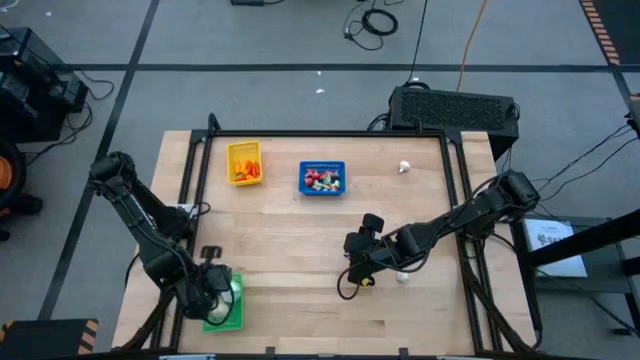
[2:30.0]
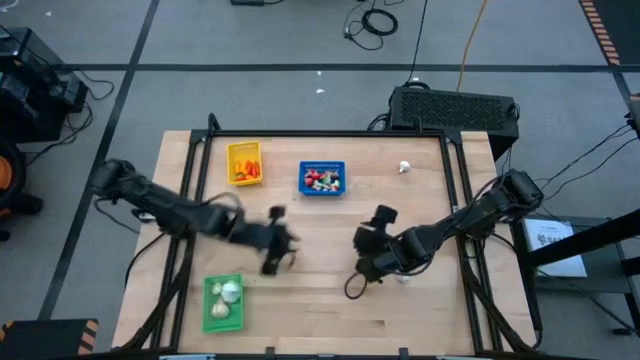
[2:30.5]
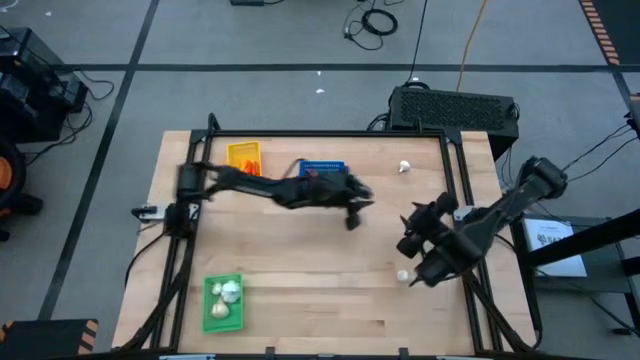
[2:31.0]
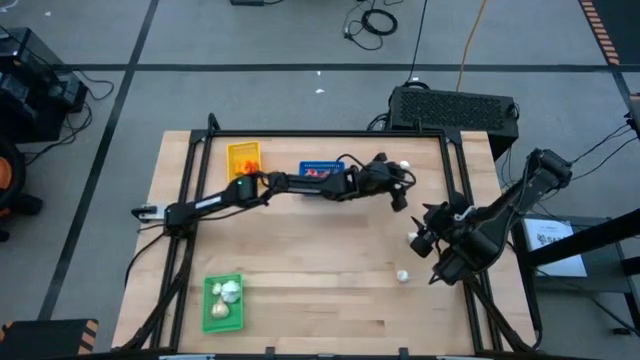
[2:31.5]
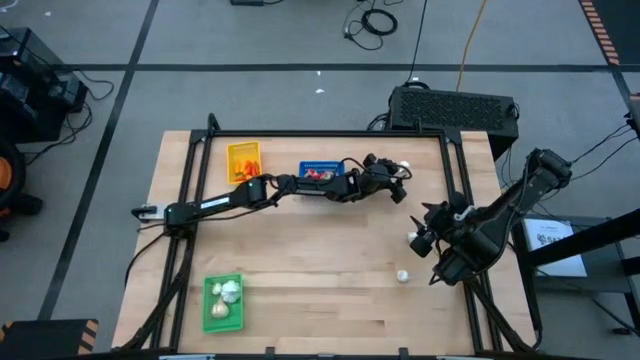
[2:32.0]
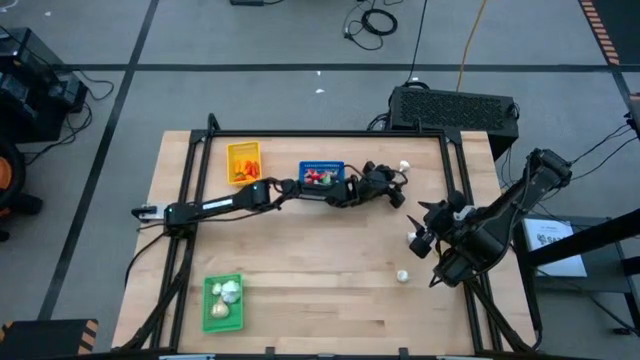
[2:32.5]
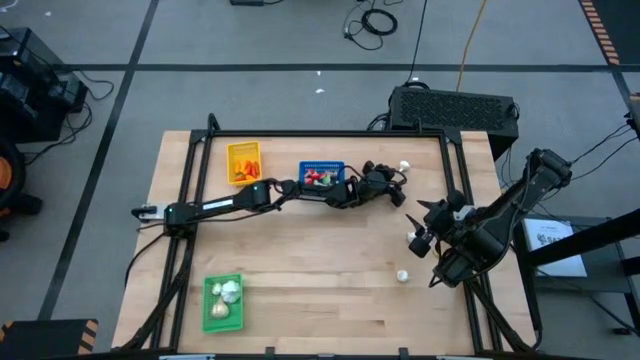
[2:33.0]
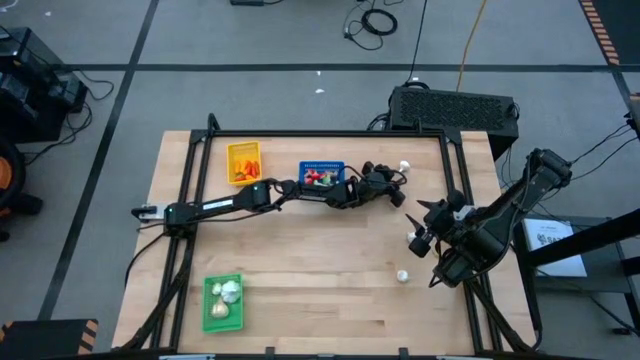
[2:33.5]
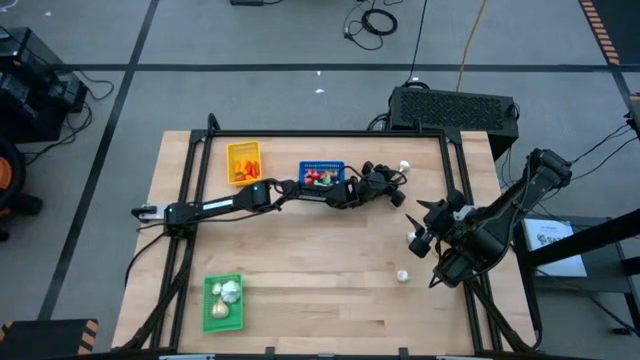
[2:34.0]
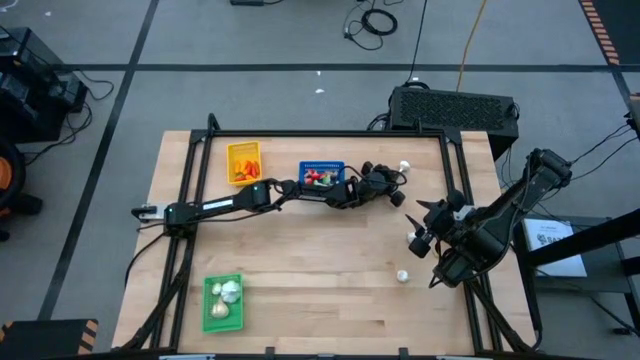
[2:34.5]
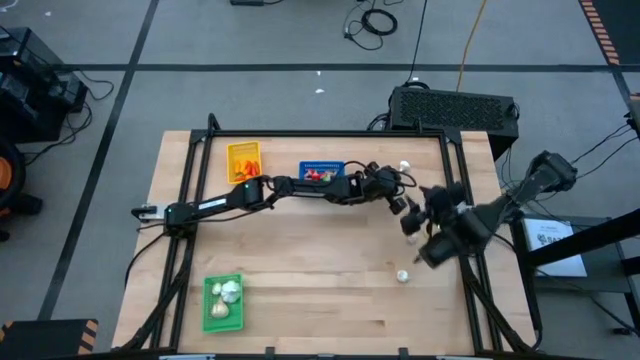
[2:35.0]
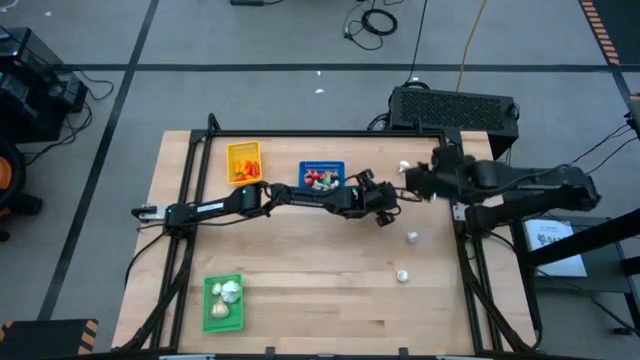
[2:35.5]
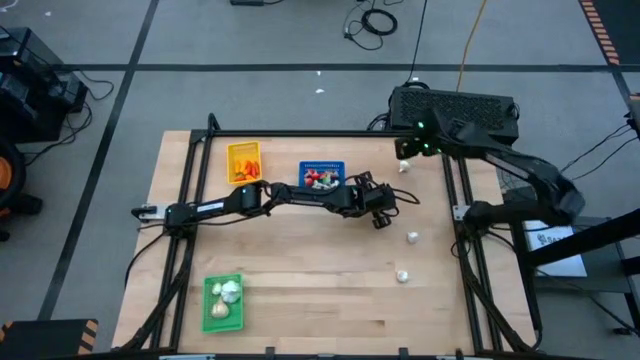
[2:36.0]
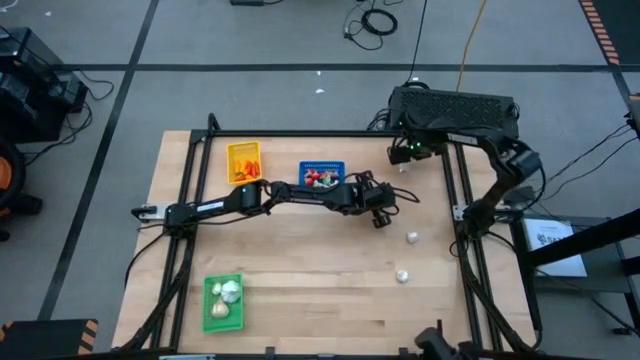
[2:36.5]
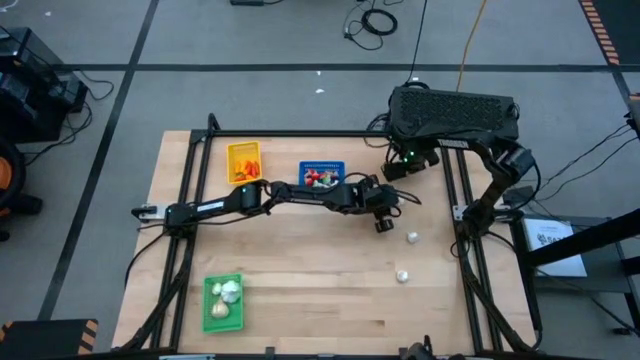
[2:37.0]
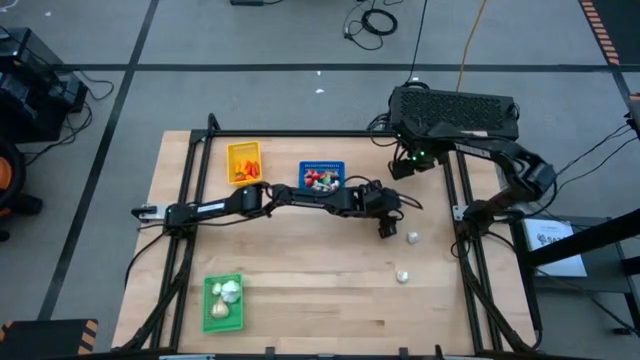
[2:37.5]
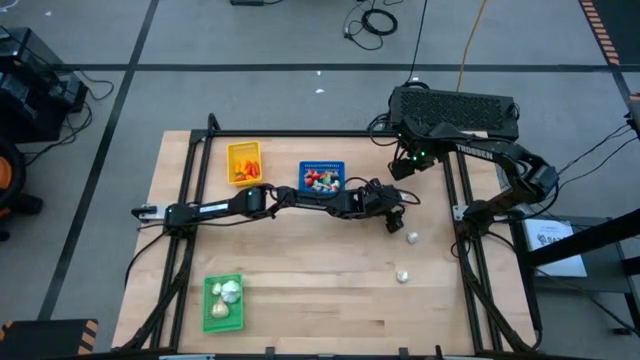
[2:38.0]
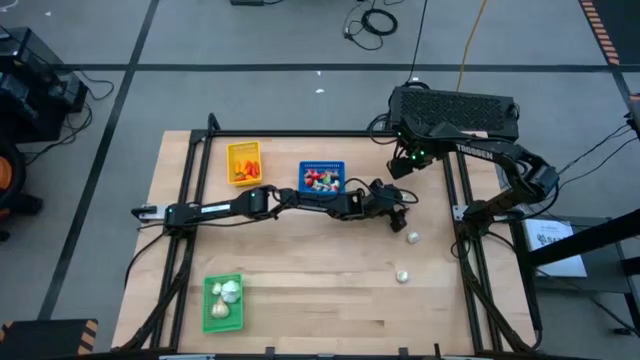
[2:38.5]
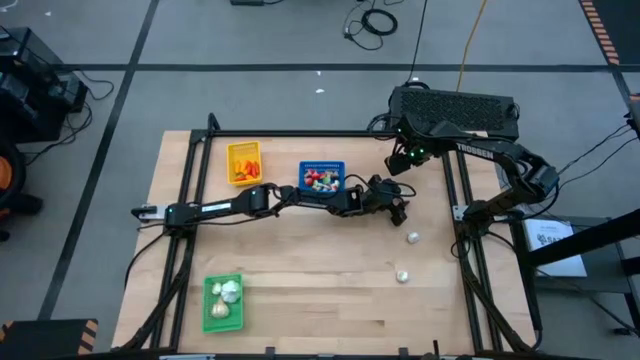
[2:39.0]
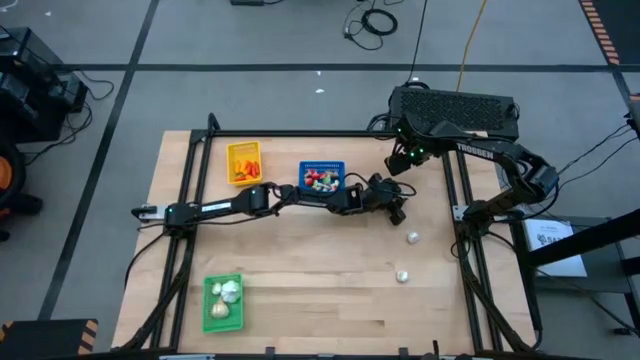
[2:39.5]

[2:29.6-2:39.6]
Task: Sort produce into baskets
Put the garlic into the green bin

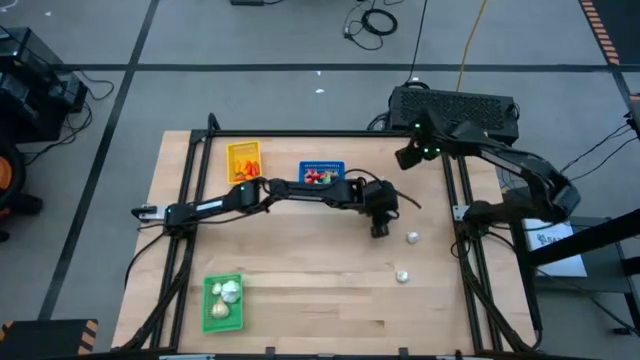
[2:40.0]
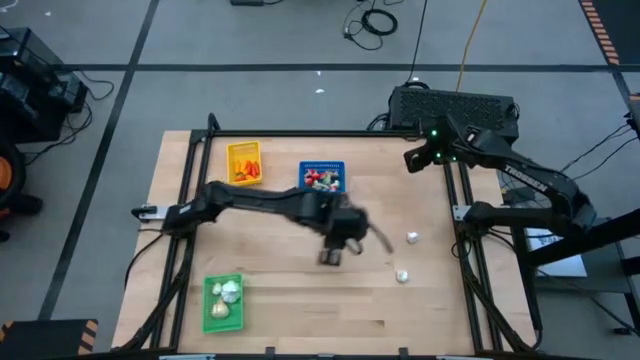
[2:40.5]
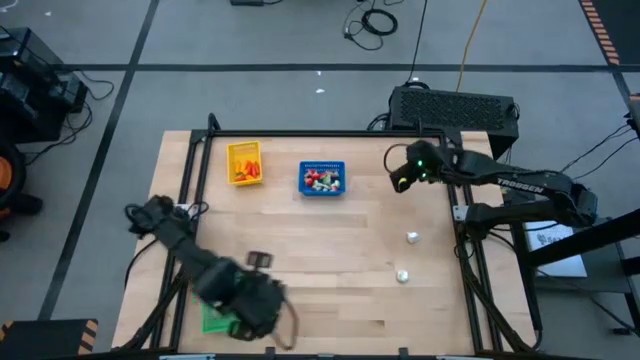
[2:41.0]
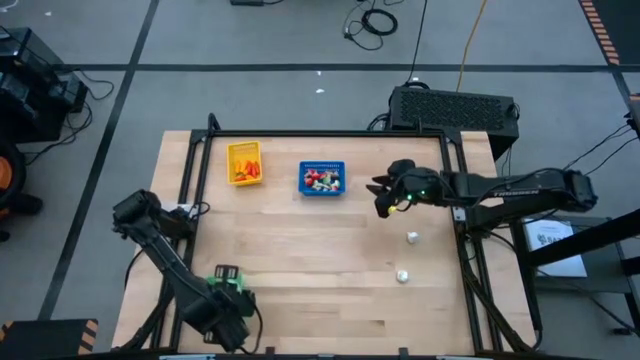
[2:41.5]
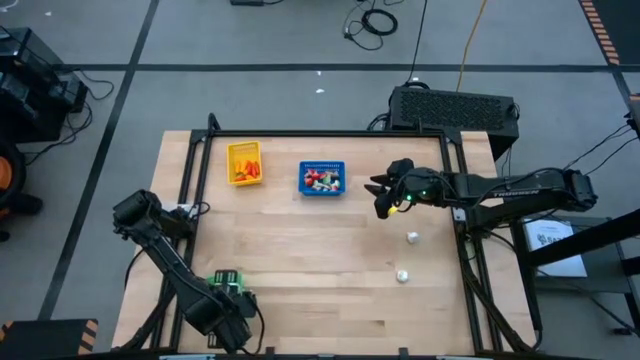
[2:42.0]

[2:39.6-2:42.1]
Put the garlic into the green bin

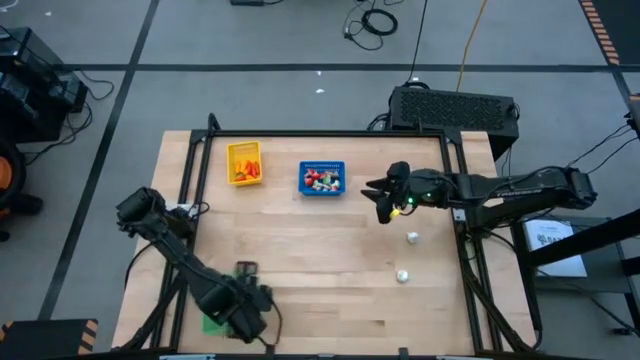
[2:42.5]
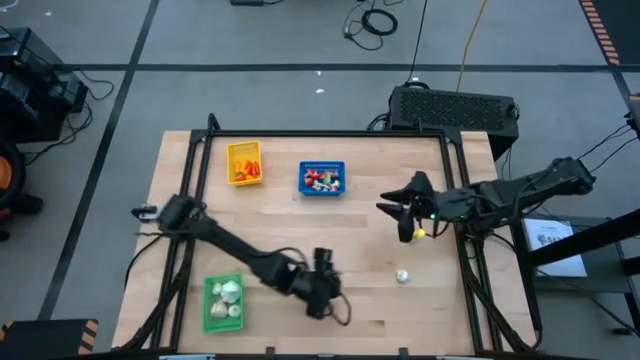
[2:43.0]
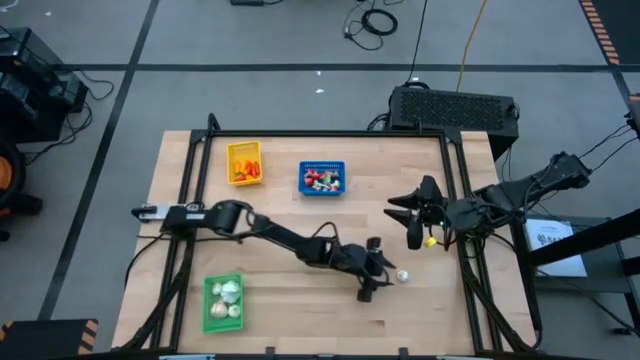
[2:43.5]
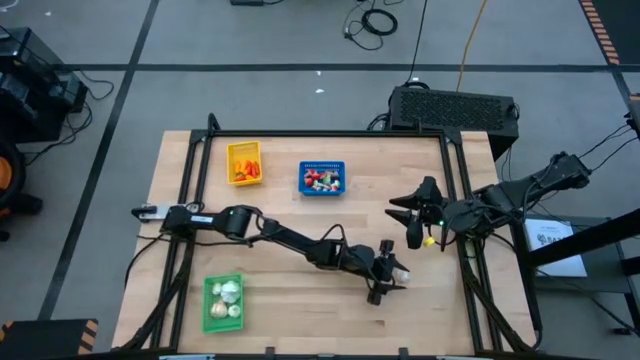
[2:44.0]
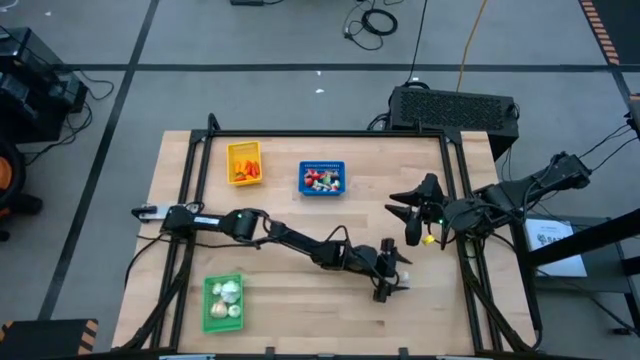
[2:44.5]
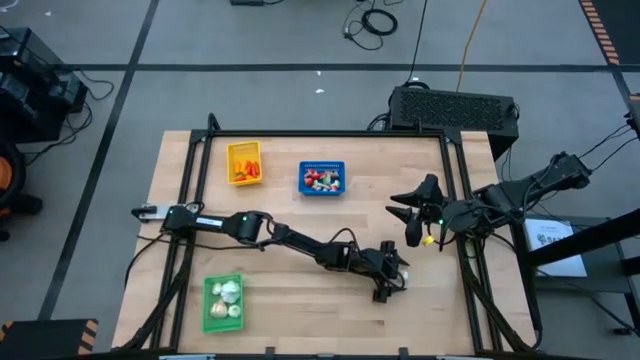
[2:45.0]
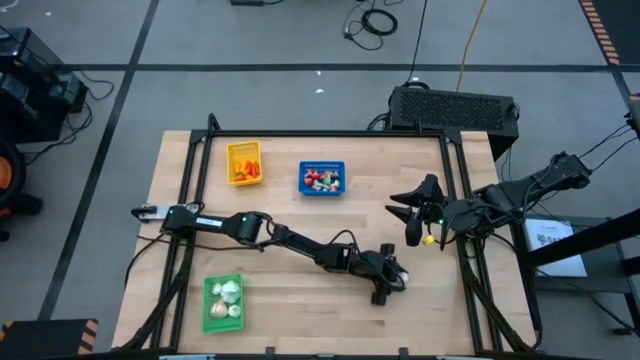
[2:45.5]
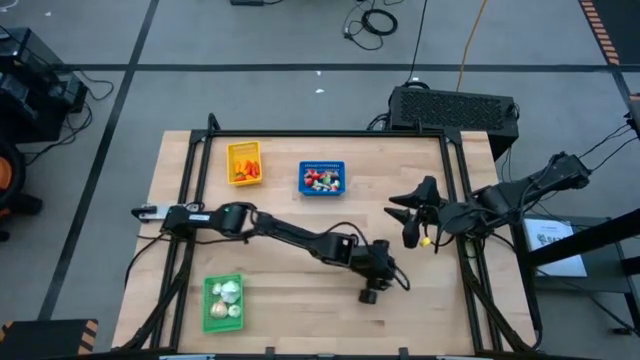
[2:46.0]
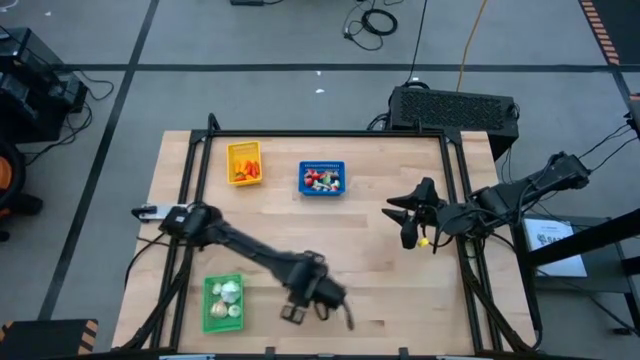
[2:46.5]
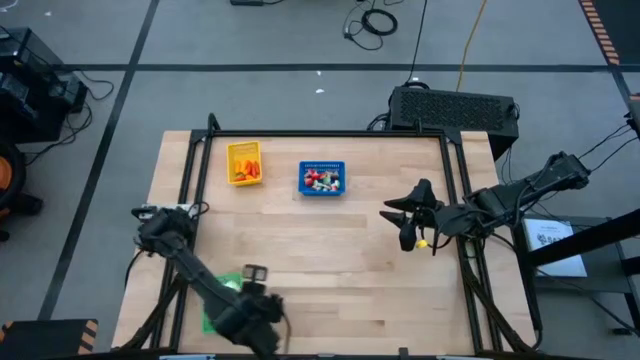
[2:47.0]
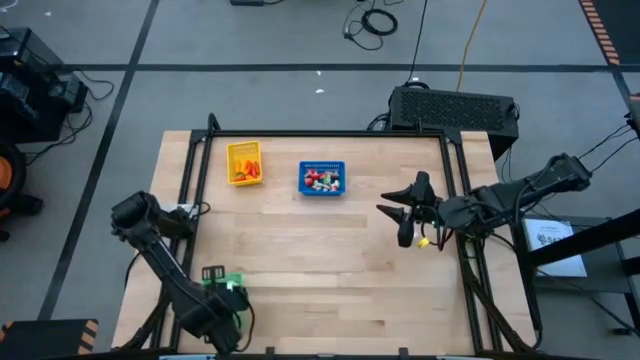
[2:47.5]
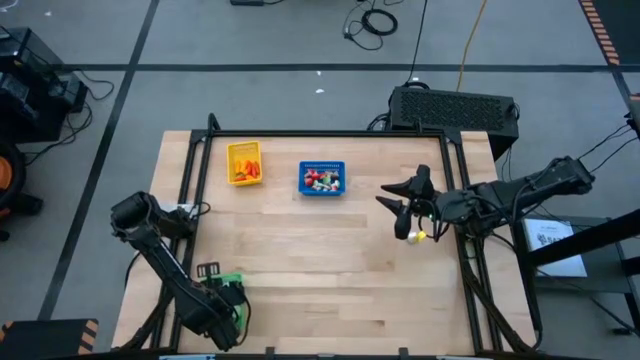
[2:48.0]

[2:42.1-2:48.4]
Put the garlic into the green bin
